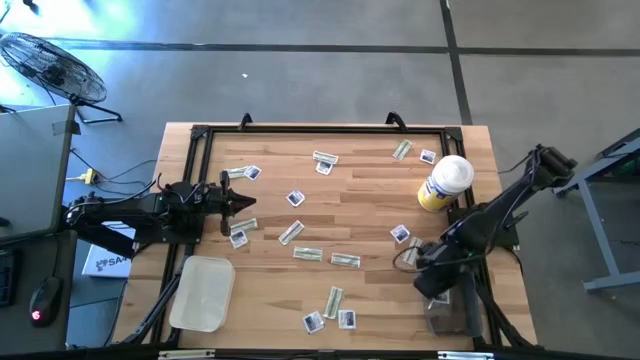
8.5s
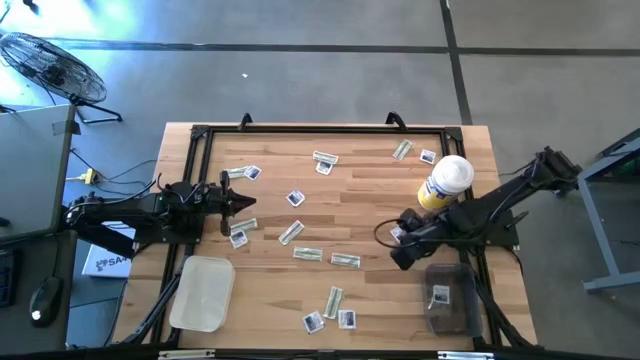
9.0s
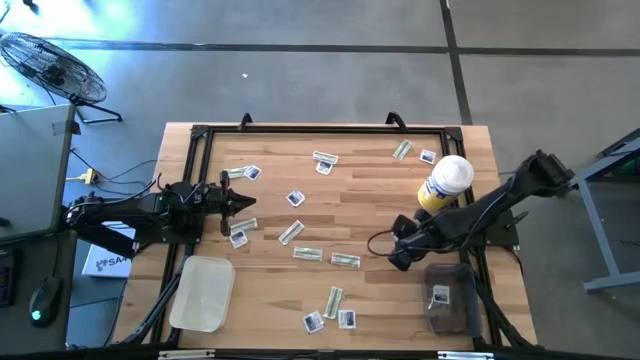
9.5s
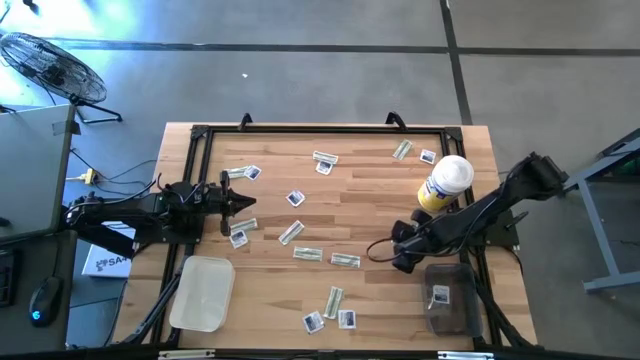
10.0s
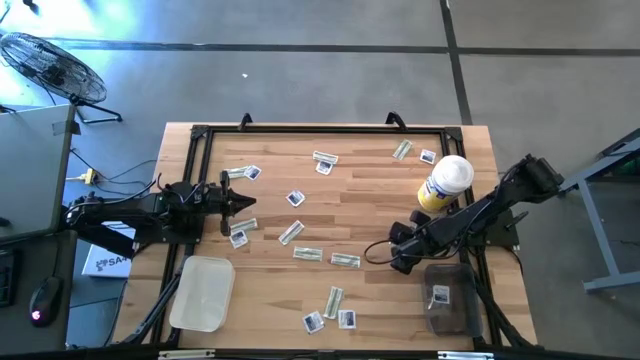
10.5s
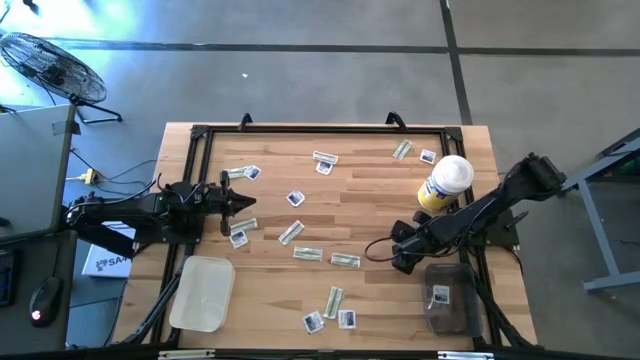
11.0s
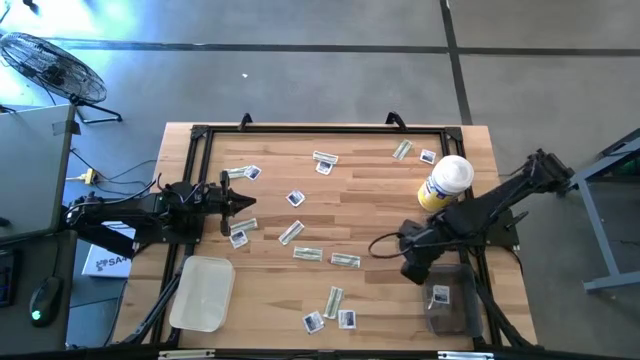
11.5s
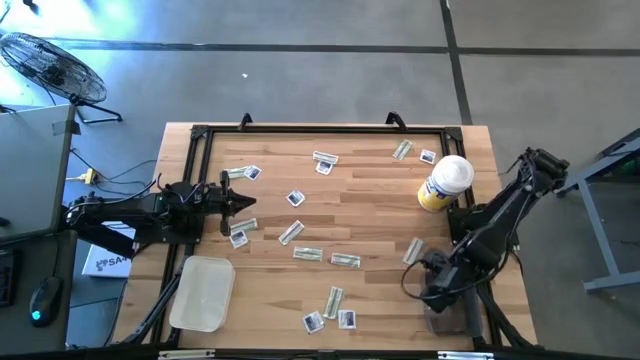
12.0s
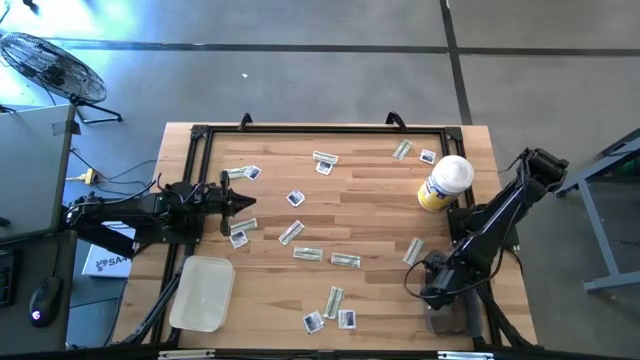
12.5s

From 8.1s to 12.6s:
Task: Pick & Place First Aid Supplies
Put the blue alcohol pad into the black bin

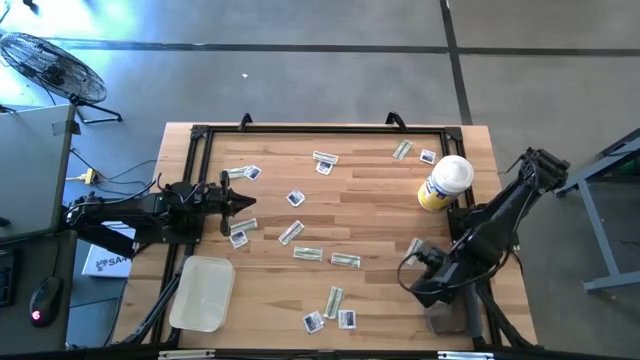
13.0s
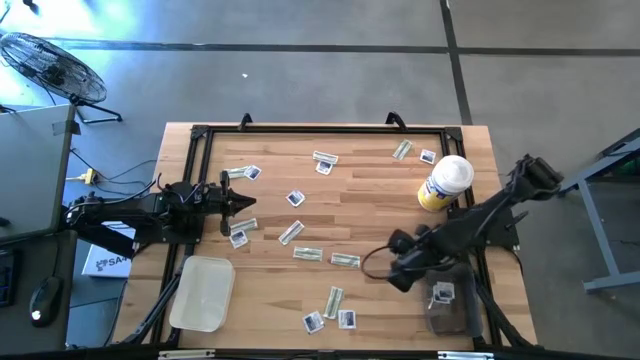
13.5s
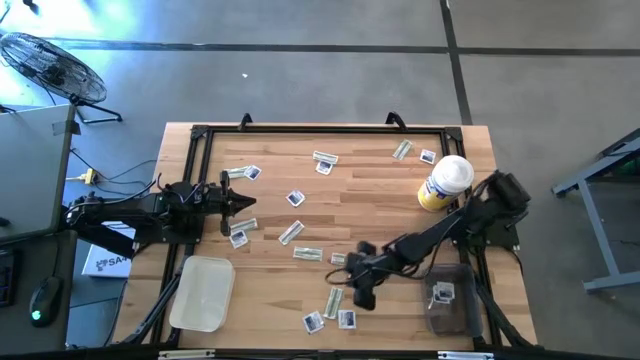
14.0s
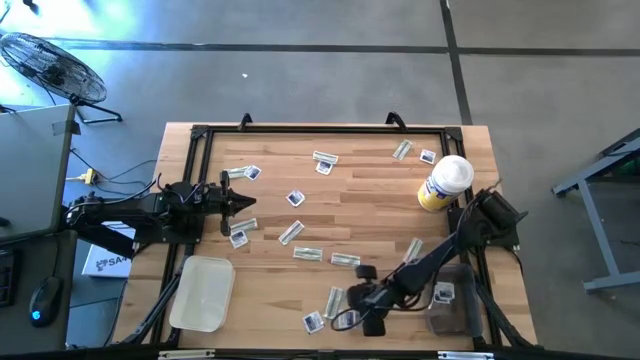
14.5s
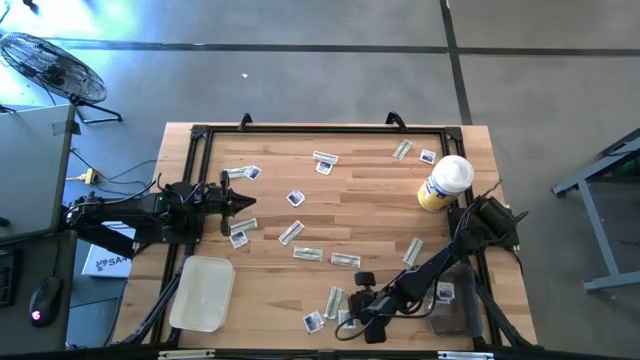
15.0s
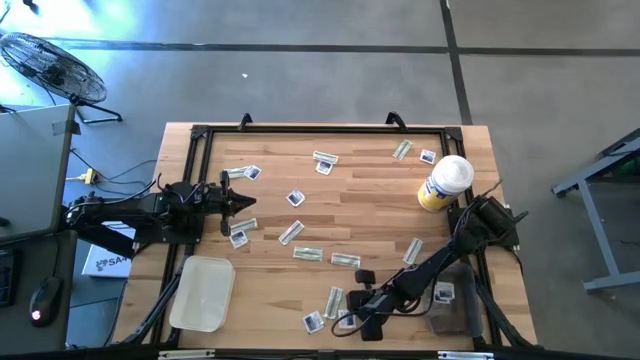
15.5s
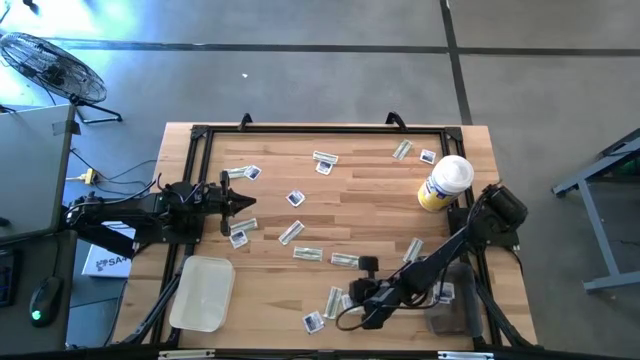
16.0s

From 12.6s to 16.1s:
Put the blue alcohol pad into the black bin

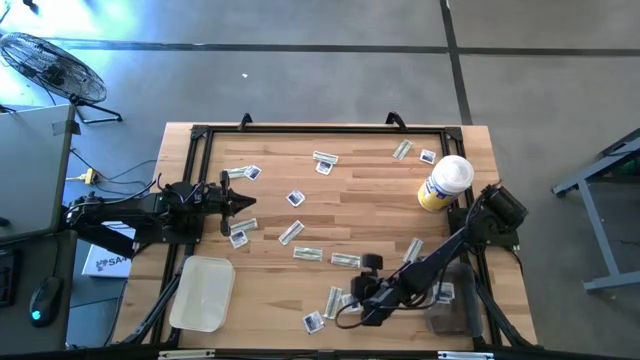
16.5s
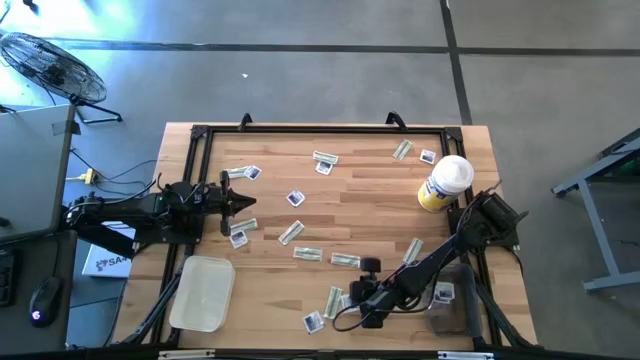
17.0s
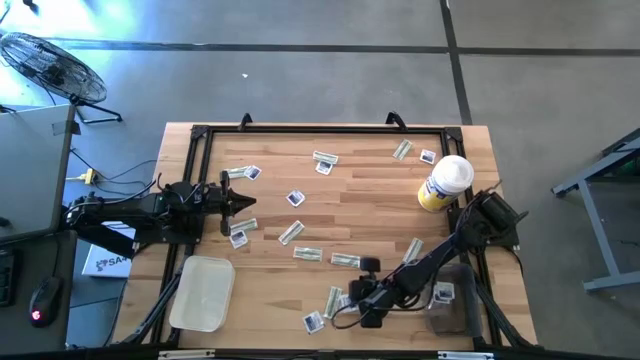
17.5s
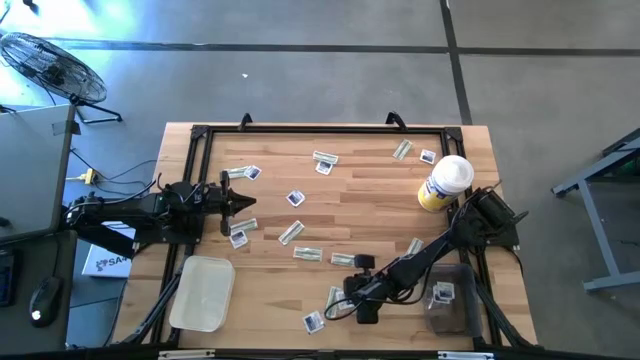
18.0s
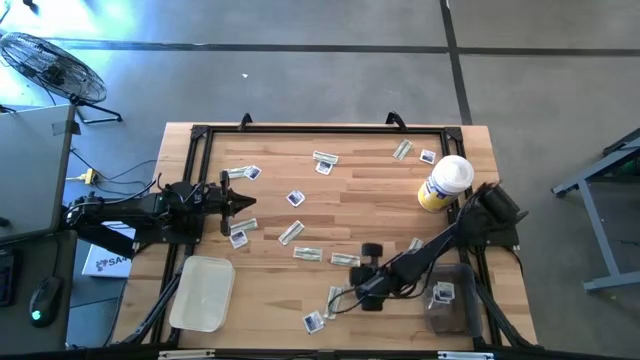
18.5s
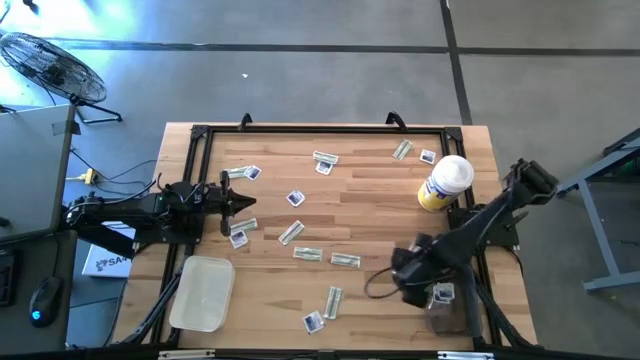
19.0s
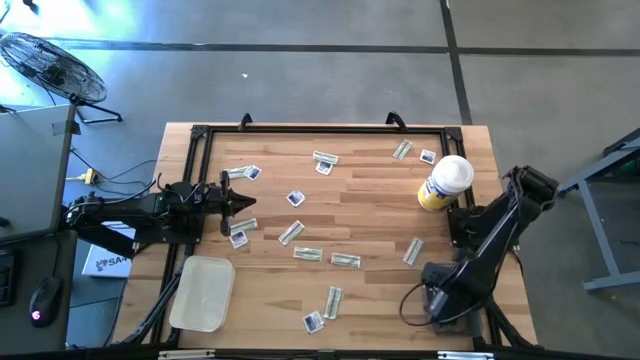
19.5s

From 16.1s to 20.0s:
Put the blue alcohol pad into the black bin

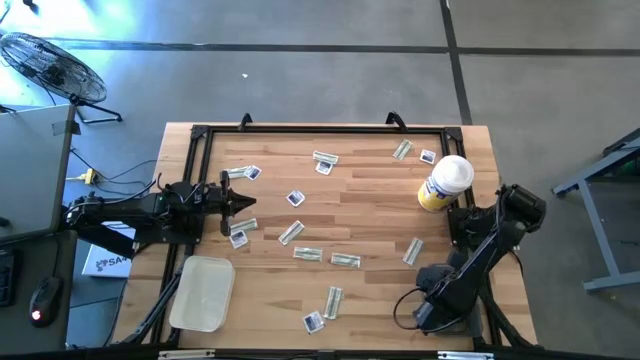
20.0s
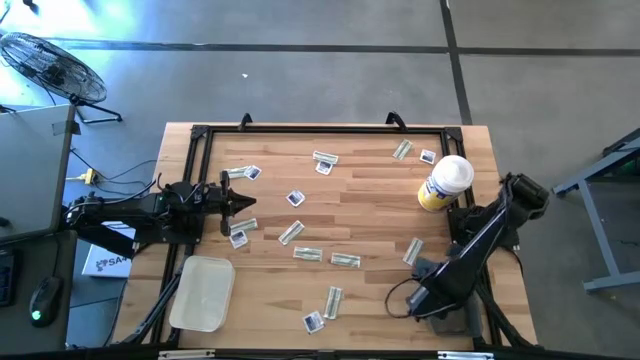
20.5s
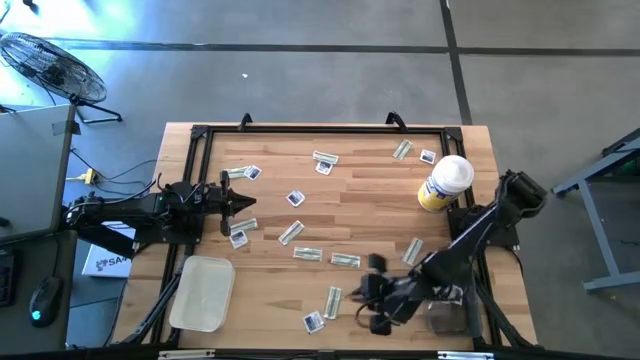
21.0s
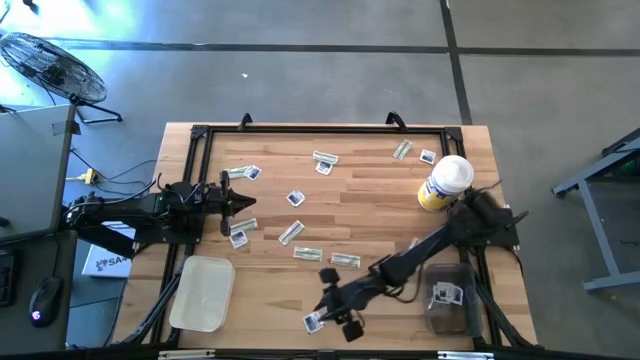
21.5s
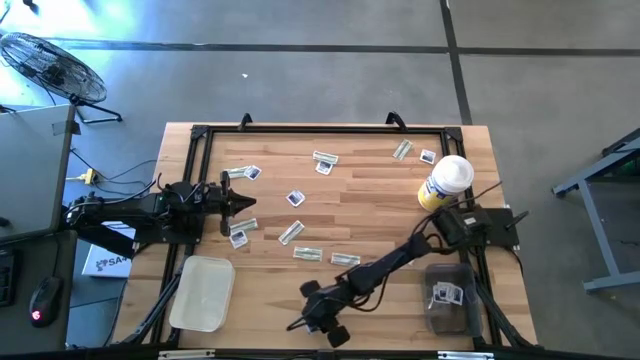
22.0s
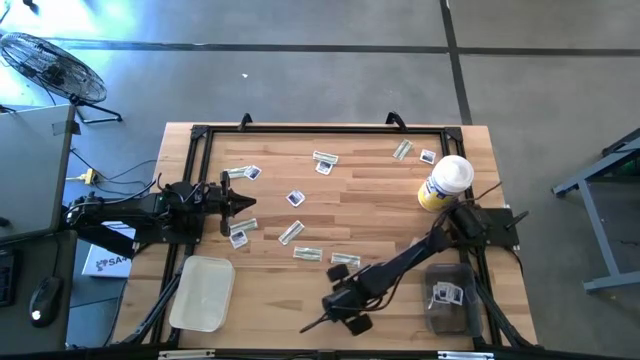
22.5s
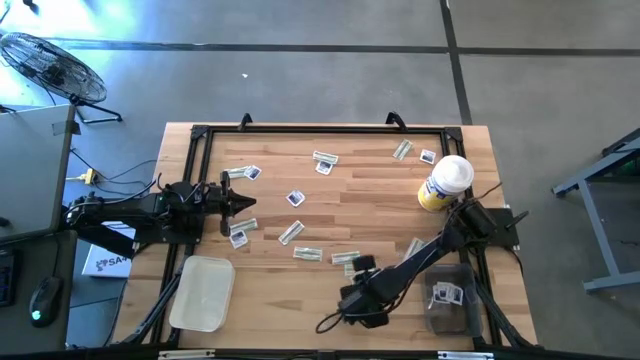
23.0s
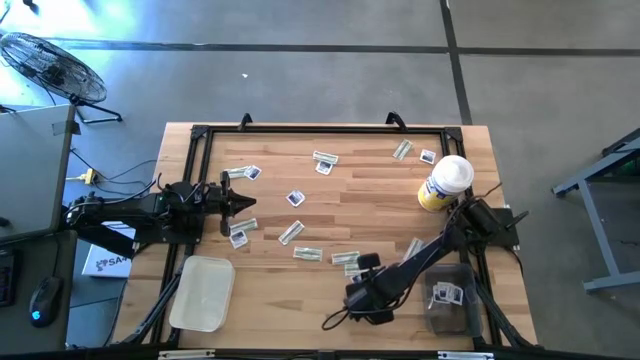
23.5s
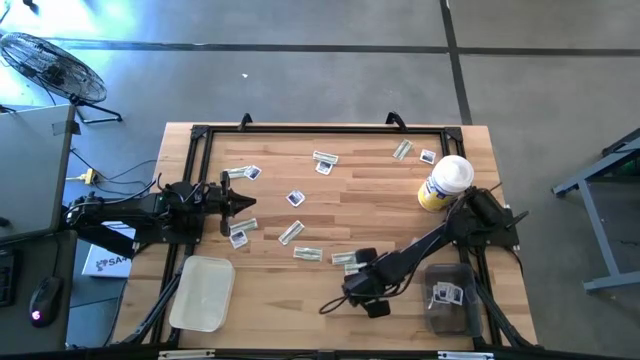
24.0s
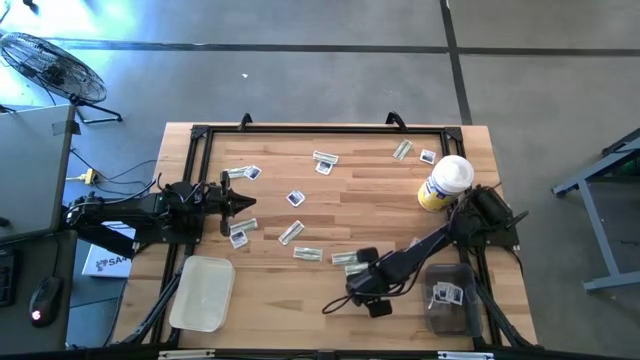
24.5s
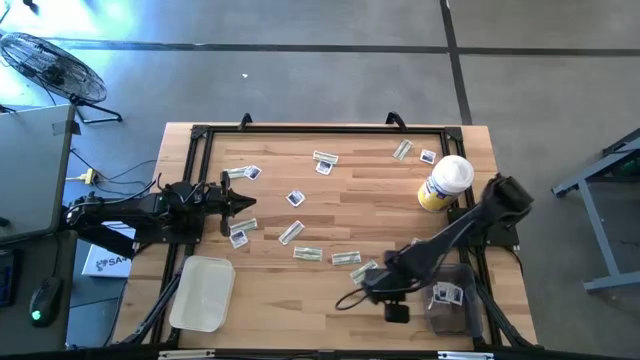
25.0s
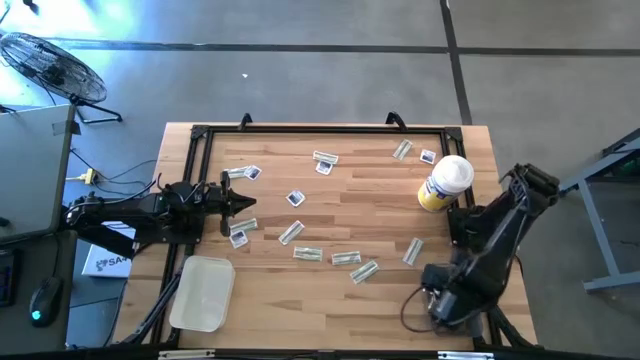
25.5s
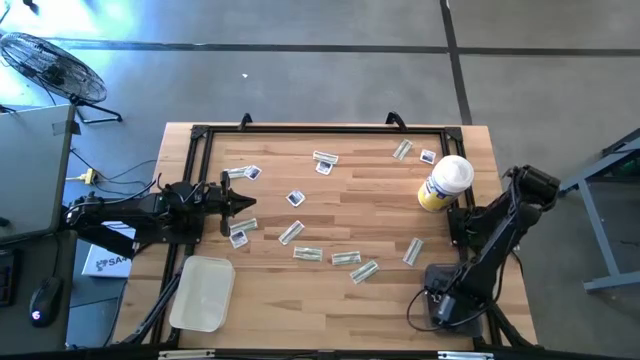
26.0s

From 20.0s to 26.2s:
Put the blue alcohol pad into the black bin

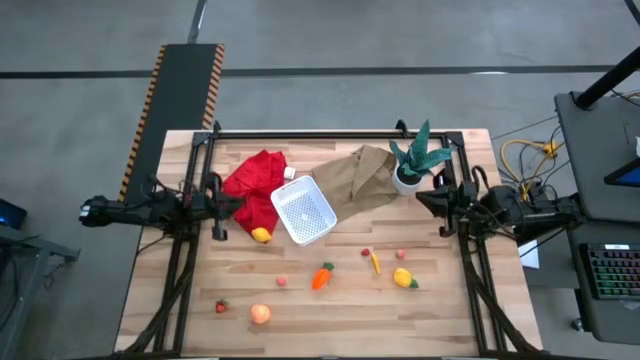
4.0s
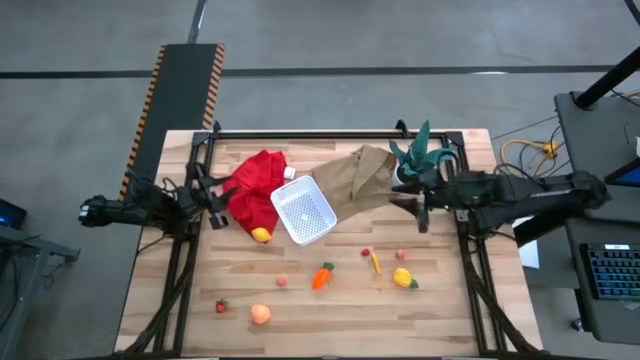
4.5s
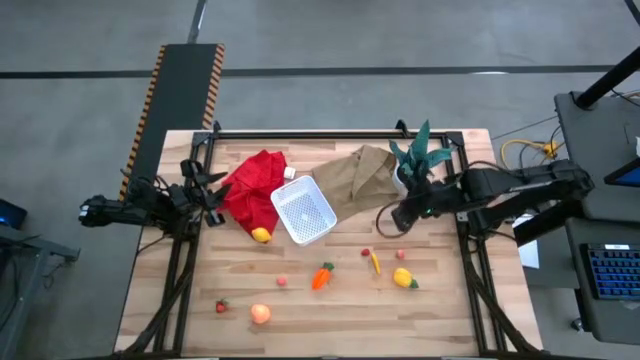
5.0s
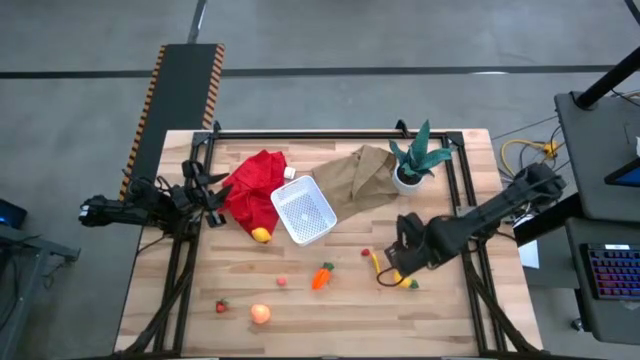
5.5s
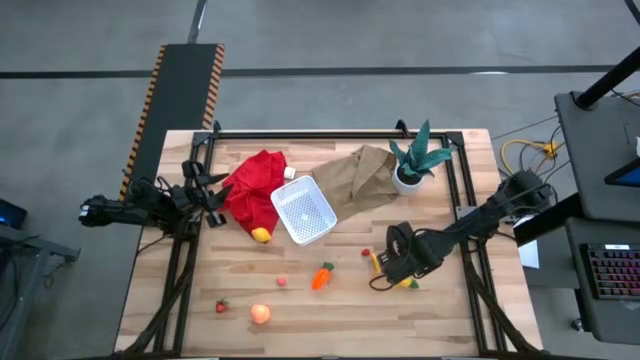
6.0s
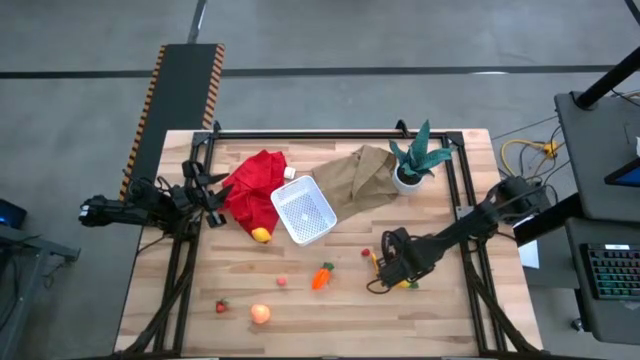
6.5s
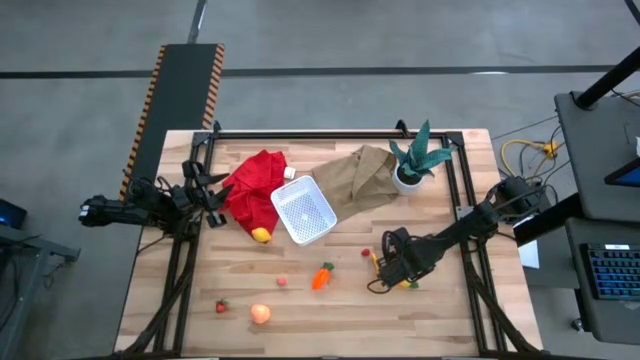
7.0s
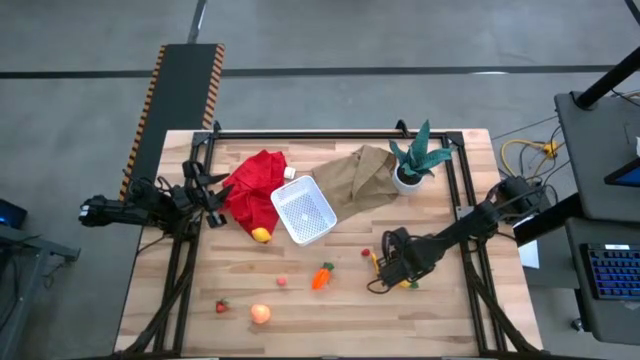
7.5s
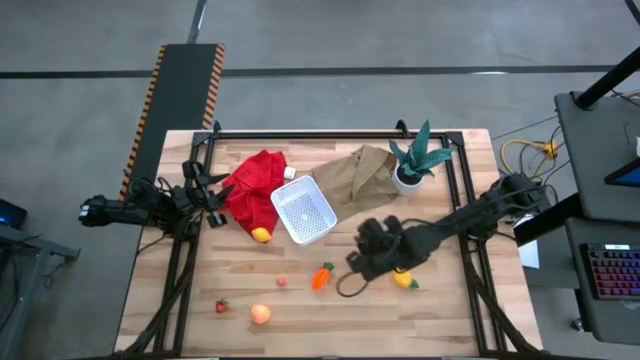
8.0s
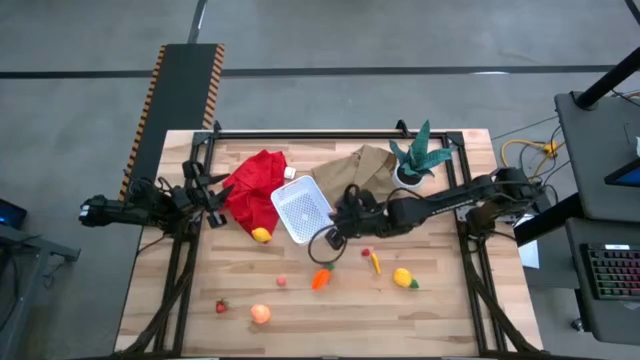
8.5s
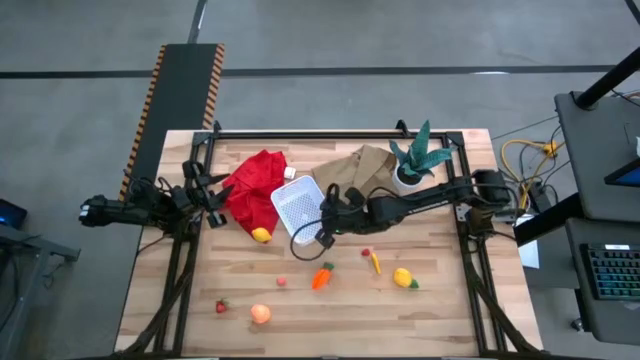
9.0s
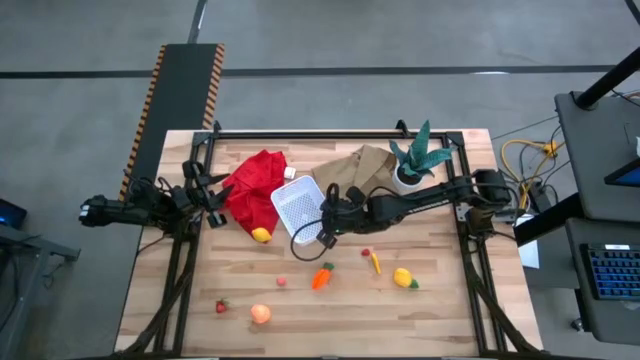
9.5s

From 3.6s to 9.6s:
Task: Pick and placing Produce into tupperware
Put the right toy raspberry into the white bin
